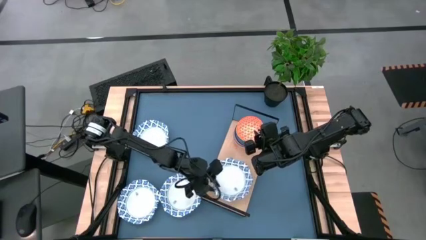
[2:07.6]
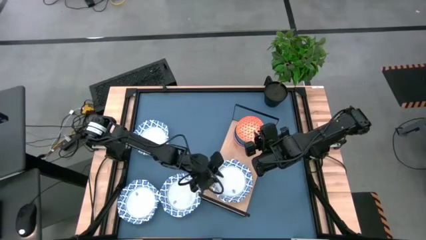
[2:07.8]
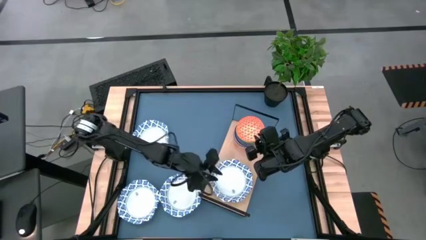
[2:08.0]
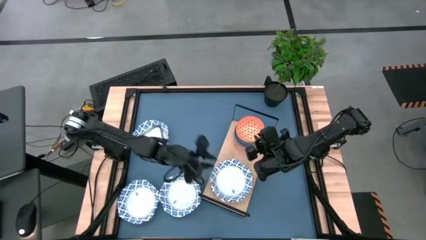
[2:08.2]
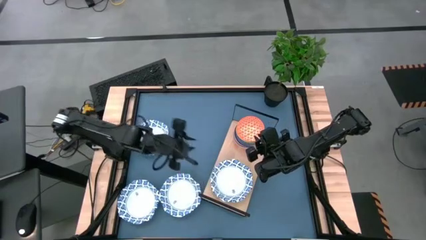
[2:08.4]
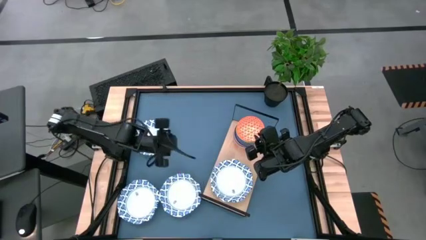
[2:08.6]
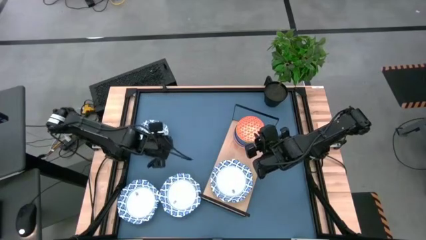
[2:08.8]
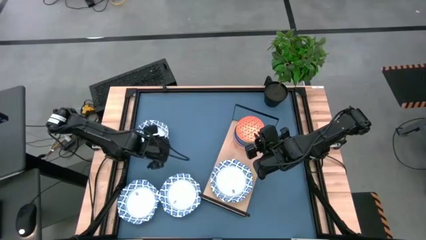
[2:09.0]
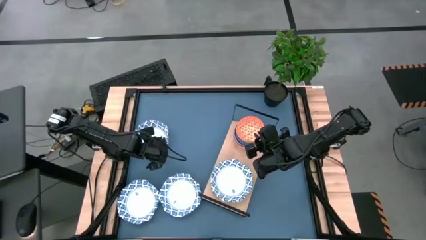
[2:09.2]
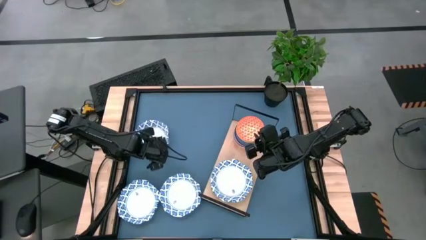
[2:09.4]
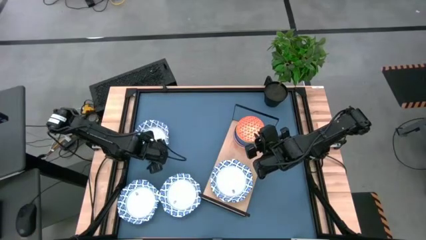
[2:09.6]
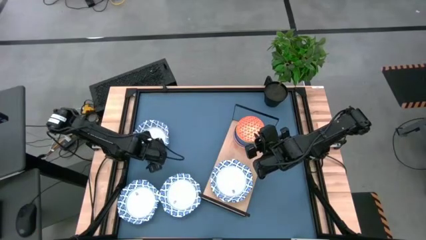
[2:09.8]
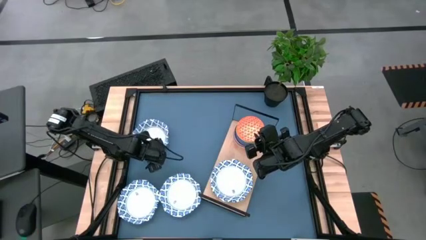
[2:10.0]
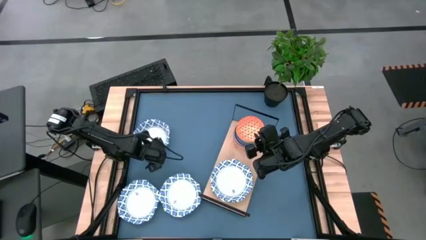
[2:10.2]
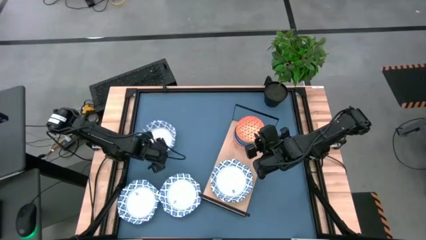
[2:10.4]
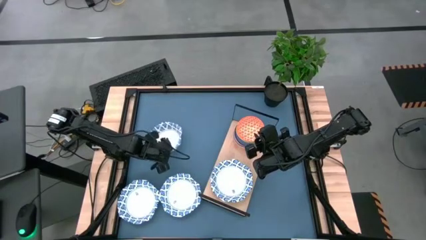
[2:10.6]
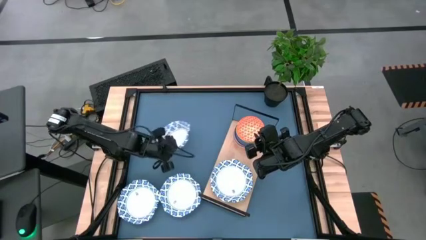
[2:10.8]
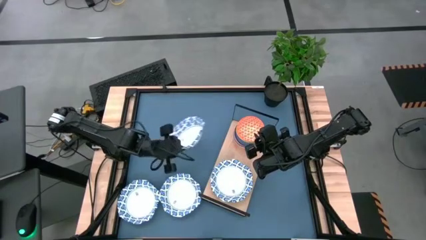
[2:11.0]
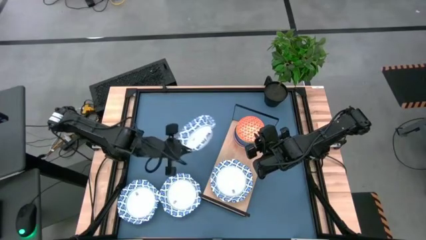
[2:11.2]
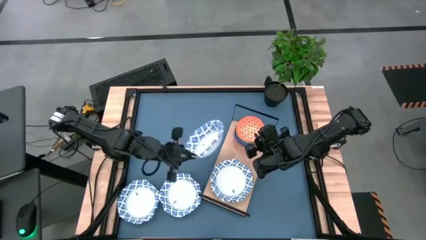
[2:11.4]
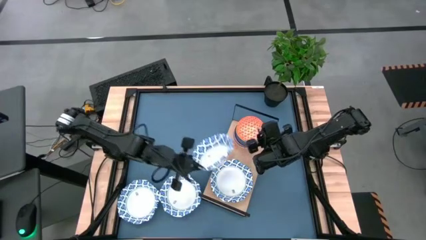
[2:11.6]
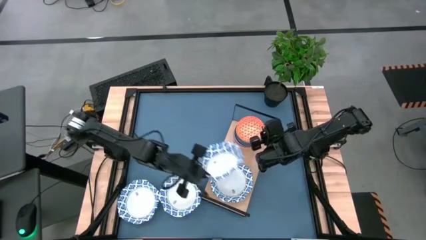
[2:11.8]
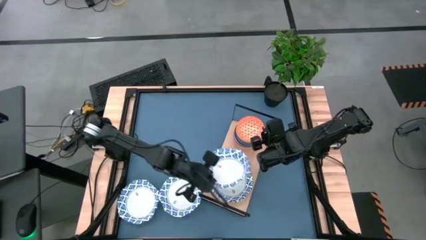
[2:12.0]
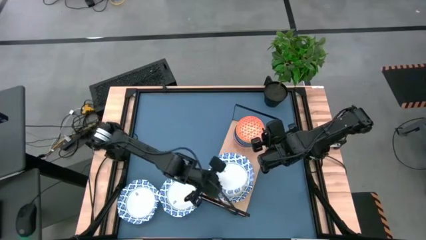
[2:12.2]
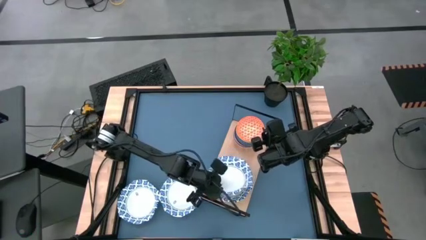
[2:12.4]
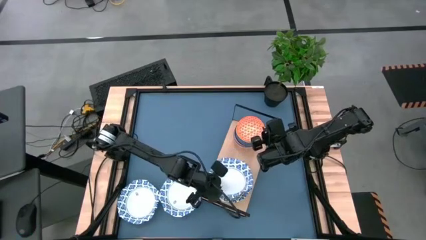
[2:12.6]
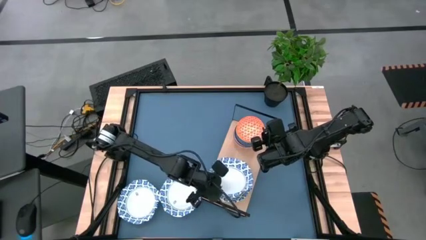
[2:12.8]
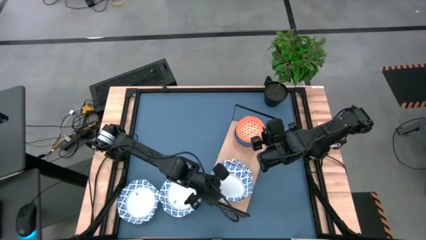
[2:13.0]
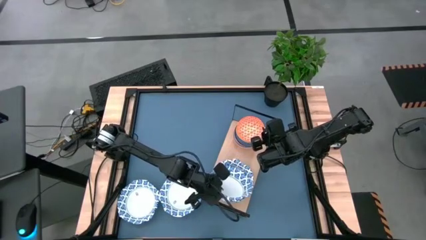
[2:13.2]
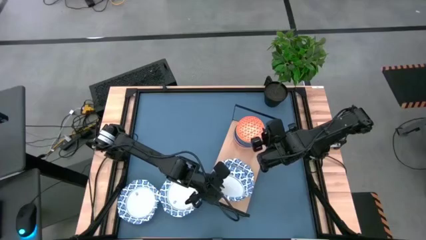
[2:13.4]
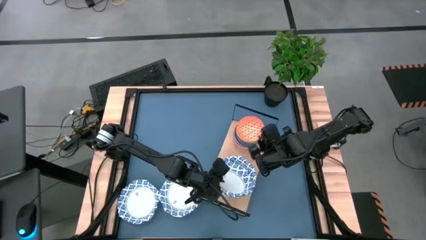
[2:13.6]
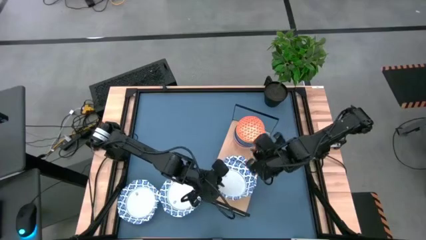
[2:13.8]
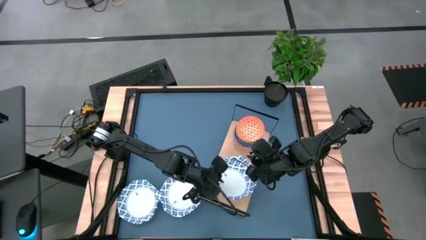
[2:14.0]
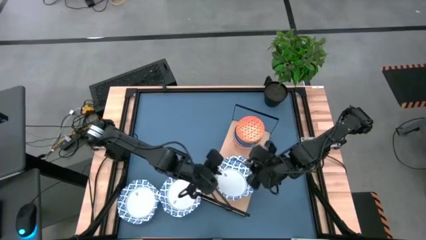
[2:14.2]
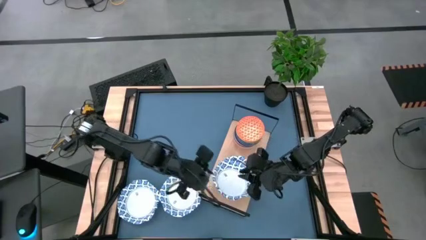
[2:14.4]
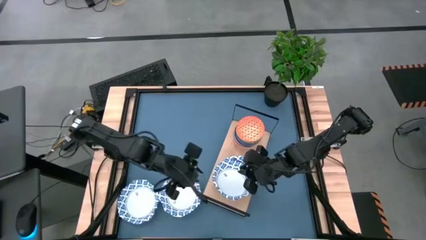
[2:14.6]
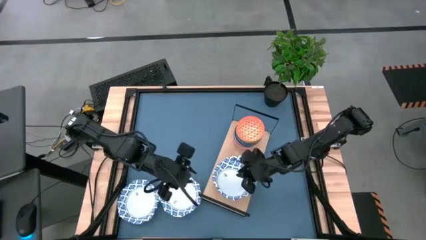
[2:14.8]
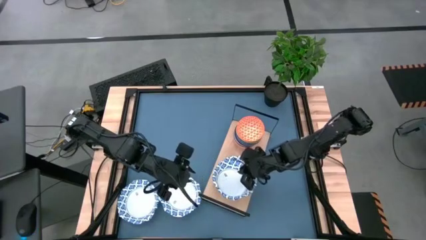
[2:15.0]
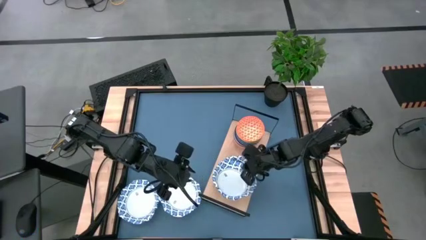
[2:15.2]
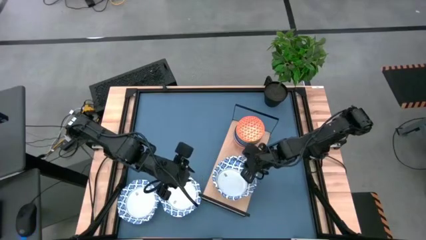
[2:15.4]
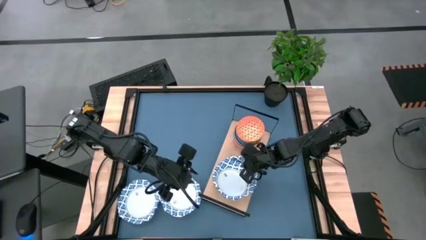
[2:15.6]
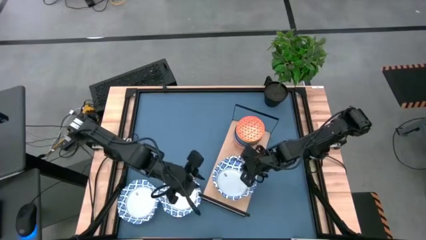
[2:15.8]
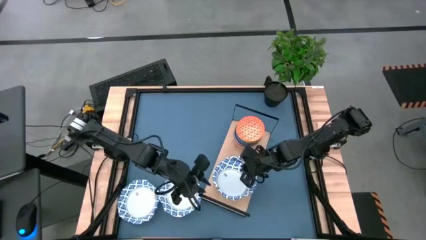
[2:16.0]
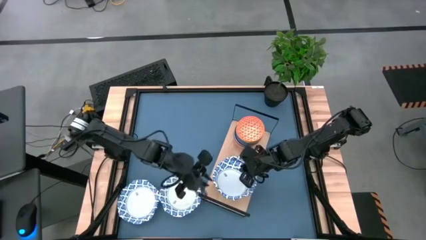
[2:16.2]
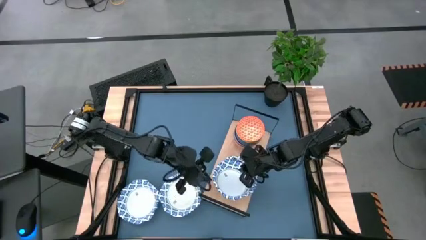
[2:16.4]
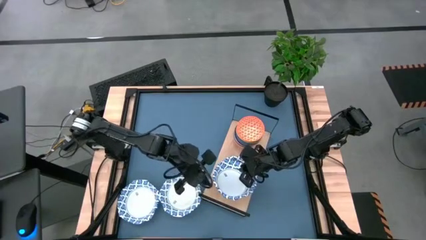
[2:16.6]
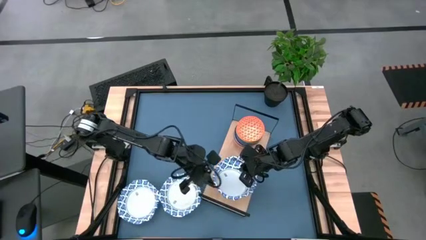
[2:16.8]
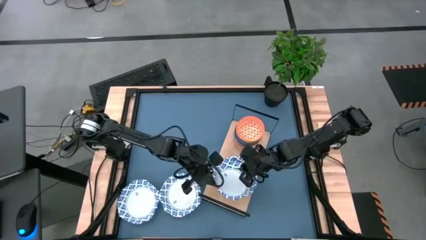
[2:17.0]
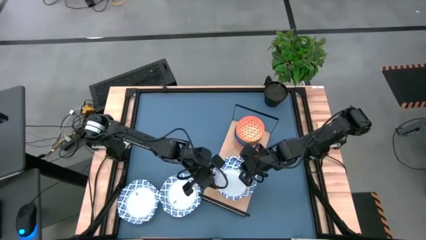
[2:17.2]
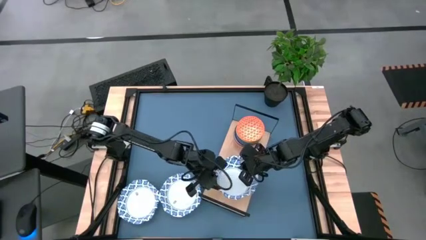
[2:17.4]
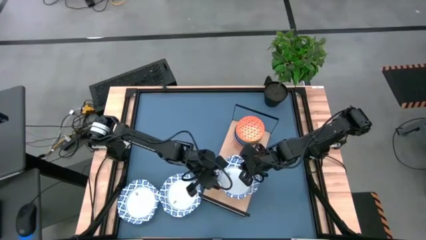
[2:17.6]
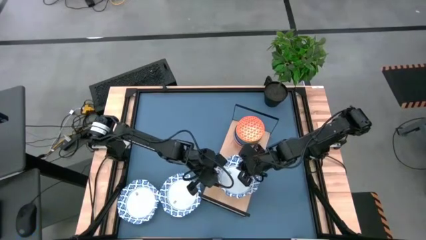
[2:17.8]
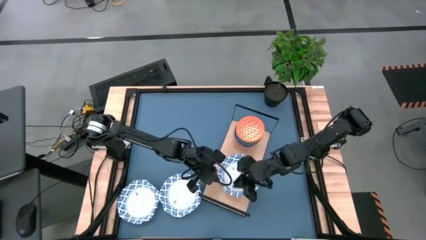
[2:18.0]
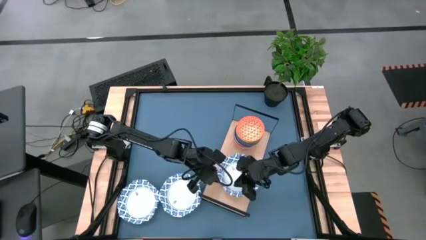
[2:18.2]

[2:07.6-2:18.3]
Task: Place and stack bowls onto a shelf
Stack the white pattern plate into the white pattern plate on the shelf

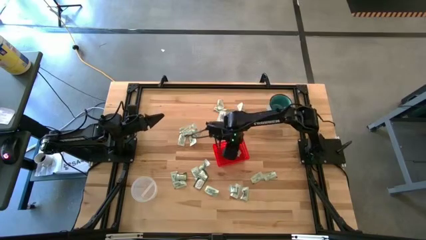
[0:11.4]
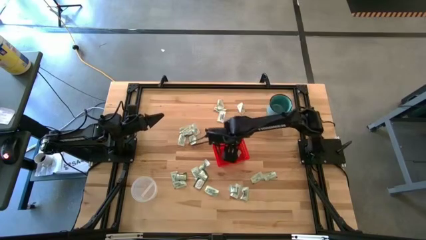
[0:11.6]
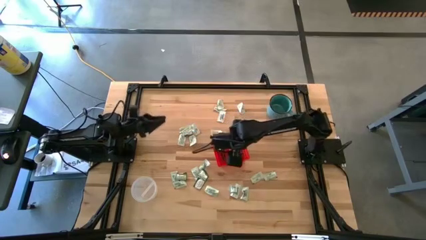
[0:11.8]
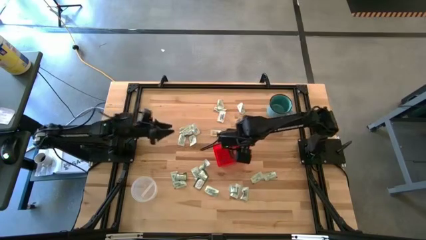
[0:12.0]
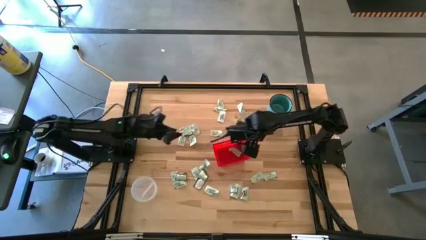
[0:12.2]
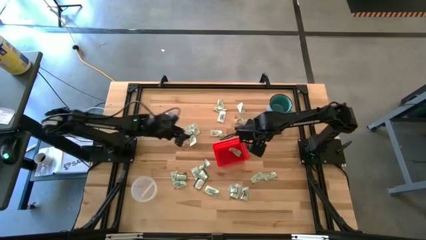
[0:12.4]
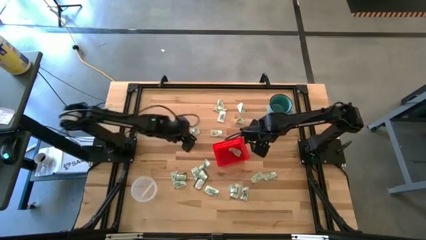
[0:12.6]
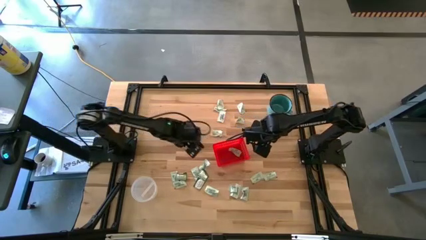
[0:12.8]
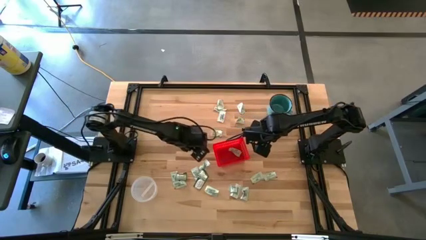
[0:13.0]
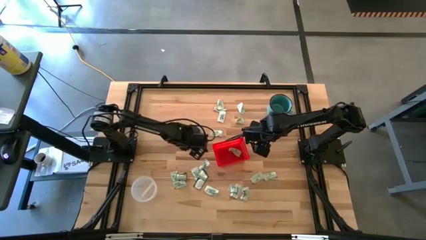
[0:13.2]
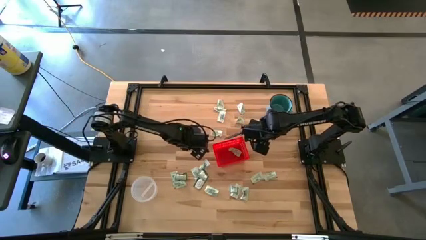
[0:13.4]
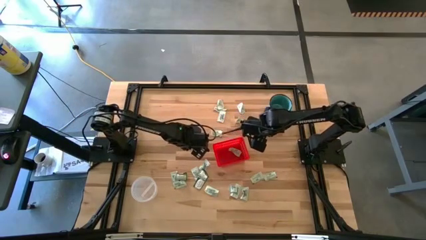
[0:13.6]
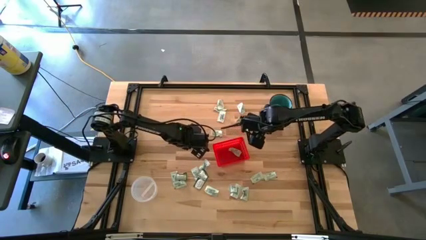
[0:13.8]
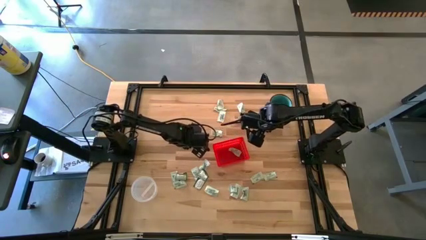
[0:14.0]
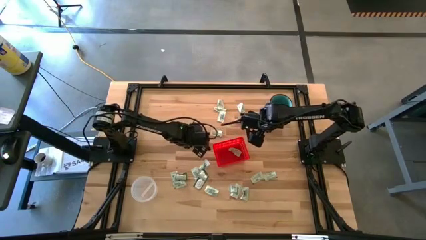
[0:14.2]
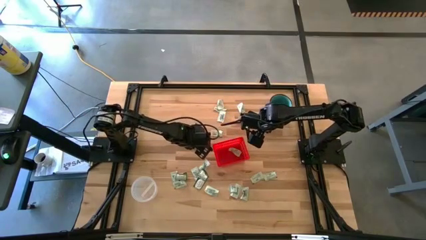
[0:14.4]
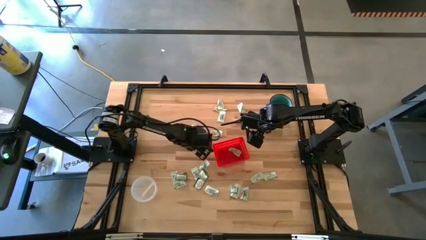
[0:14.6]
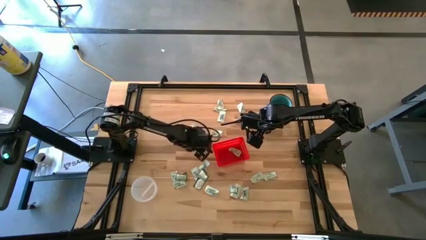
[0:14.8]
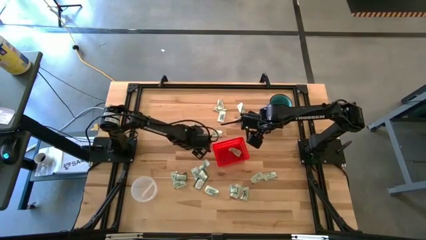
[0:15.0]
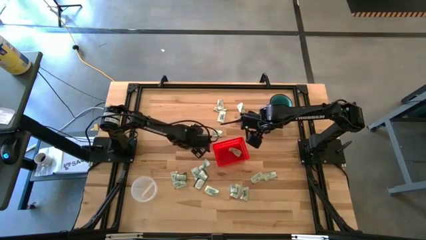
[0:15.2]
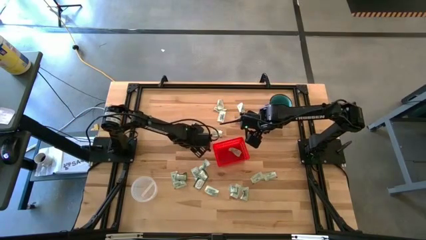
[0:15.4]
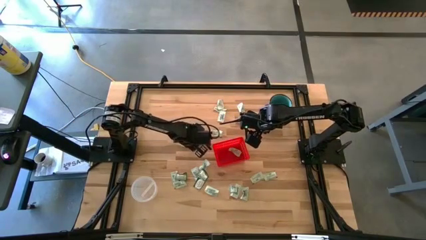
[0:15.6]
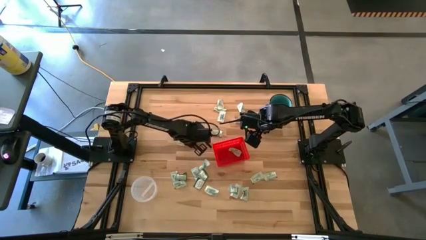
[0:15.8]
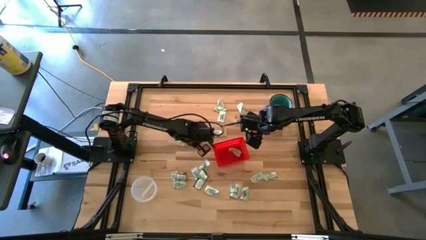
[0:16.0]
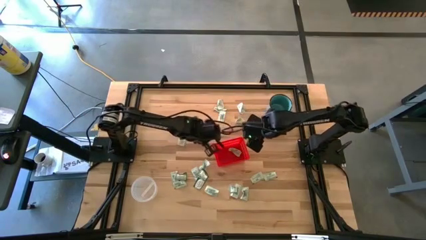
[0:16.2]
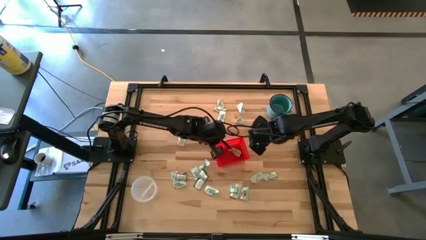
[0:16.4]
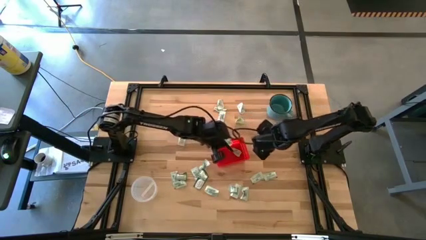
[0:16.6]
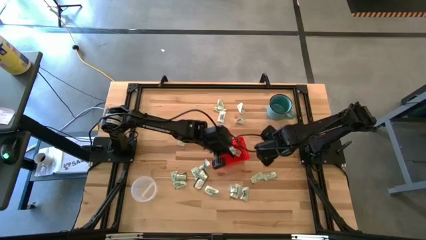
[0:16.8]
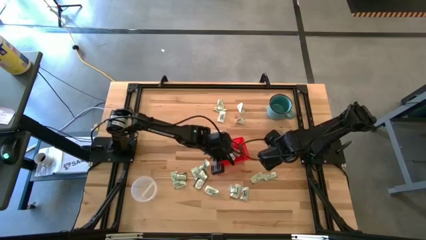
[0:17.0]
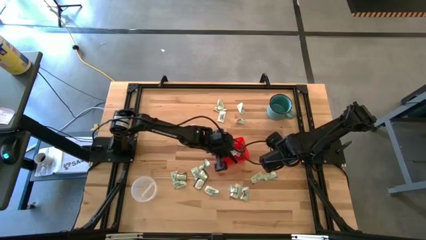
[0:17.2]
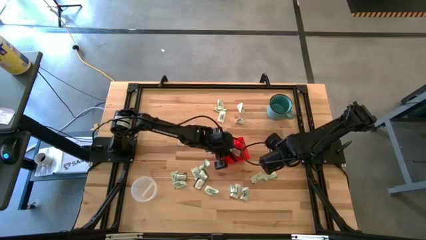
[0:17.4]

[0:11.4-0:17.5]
Task: Pick and place items into bin
Put the white stevia pack into the red bin

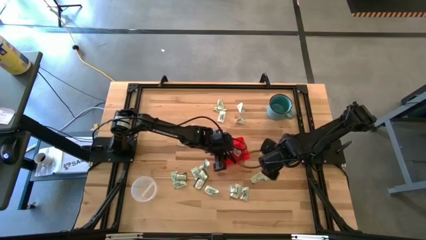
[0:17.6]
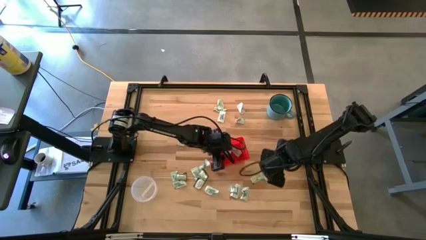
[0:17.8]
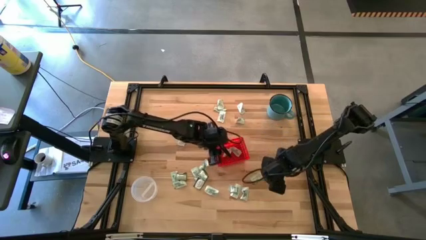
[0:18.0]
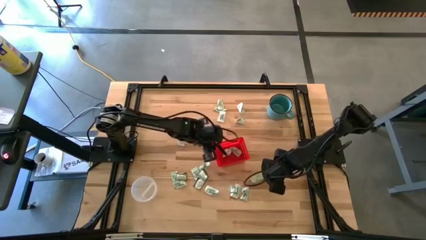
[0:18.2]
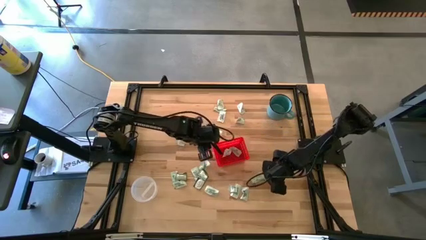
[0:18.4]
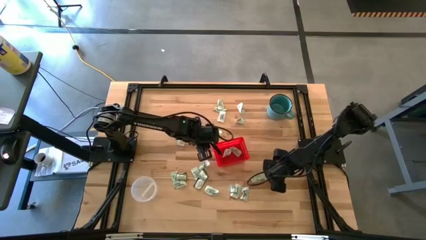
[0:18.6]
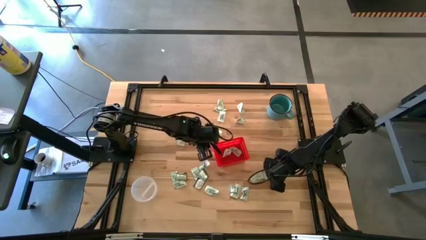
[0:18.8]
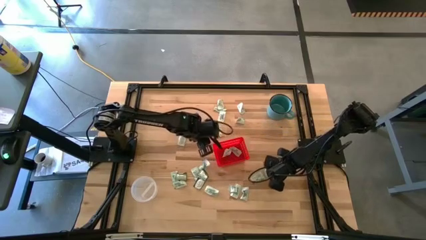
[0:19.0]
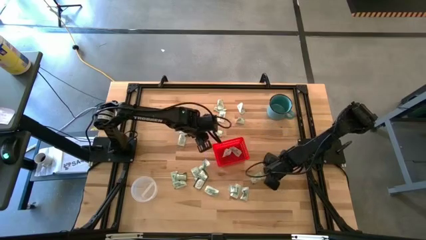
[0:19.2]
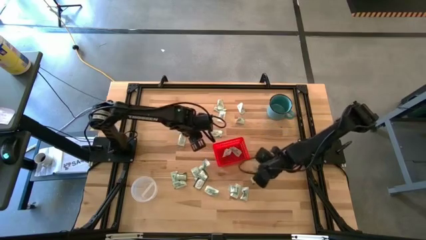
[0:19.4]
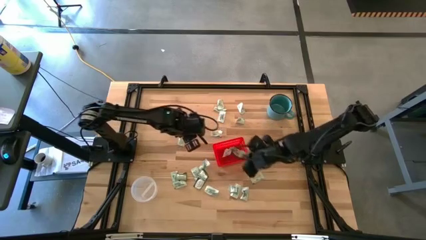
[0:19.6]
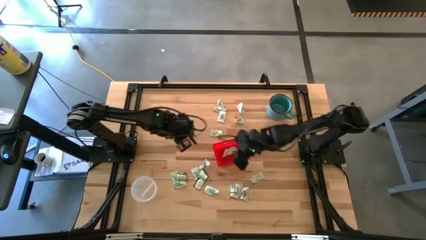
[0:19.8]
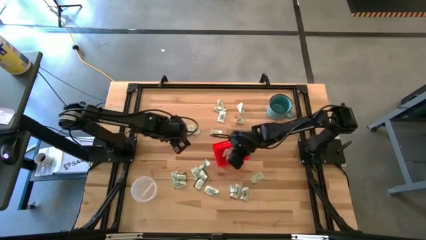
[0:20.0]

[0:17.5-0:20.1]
Put the white stevia pack into the red bin
